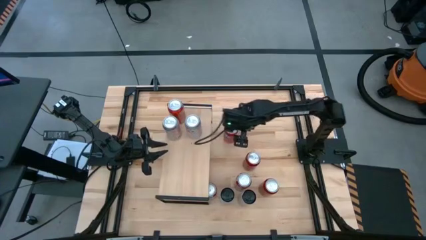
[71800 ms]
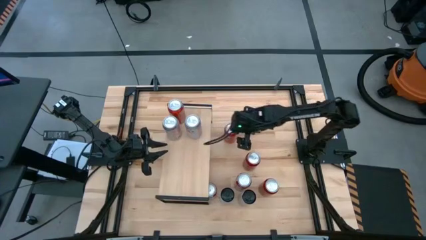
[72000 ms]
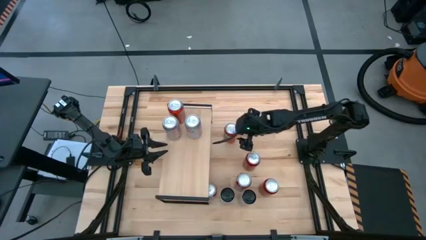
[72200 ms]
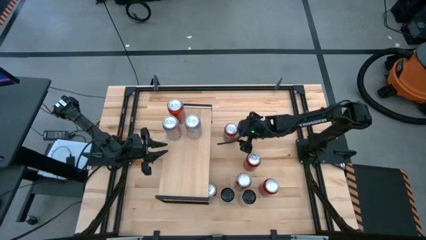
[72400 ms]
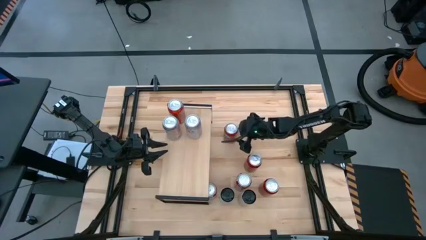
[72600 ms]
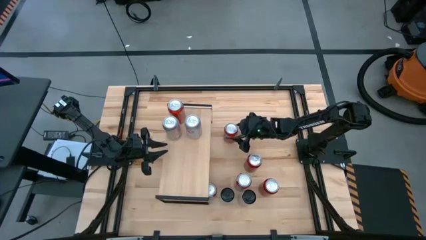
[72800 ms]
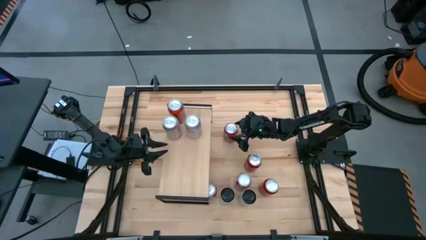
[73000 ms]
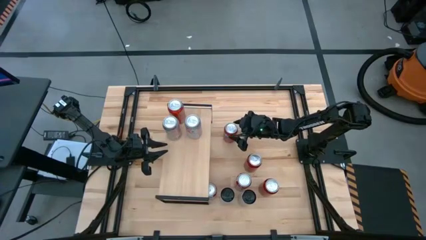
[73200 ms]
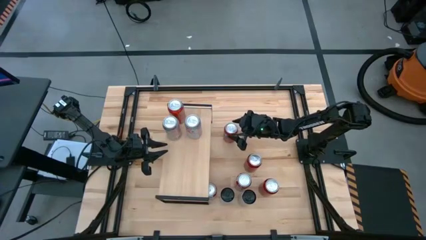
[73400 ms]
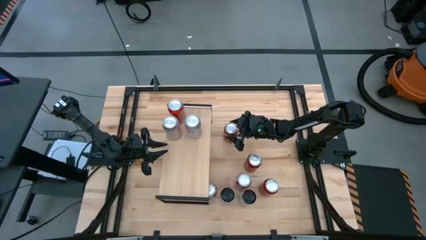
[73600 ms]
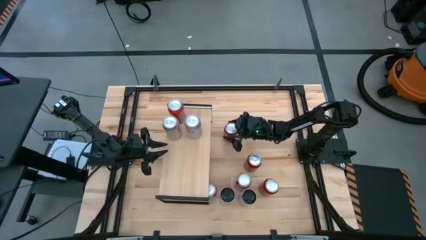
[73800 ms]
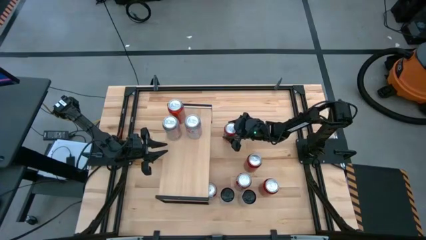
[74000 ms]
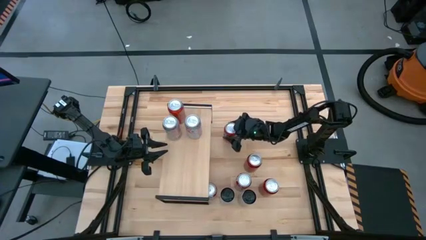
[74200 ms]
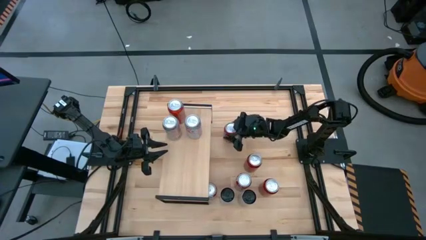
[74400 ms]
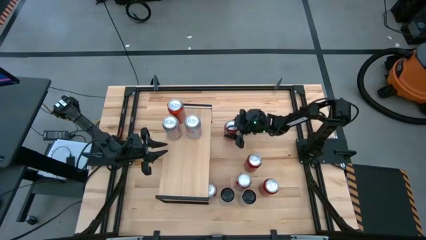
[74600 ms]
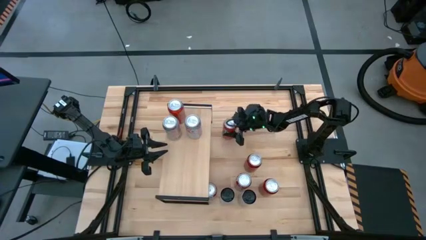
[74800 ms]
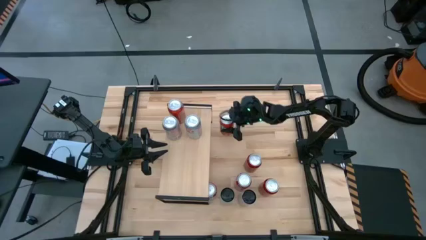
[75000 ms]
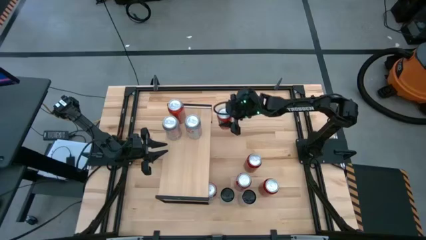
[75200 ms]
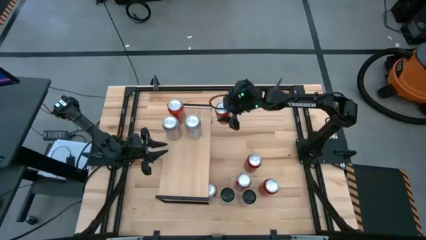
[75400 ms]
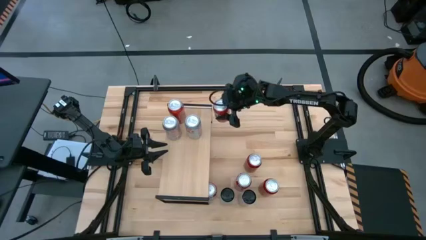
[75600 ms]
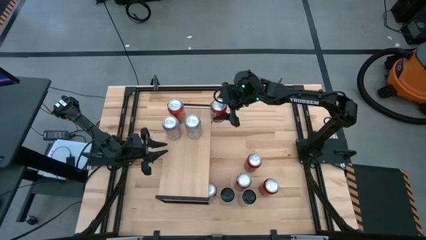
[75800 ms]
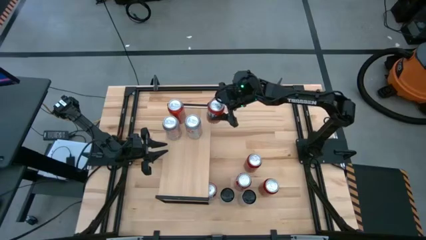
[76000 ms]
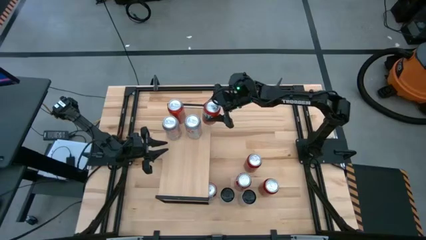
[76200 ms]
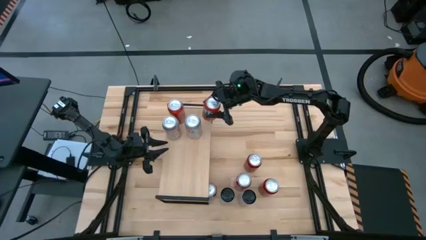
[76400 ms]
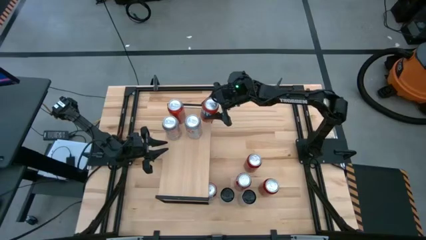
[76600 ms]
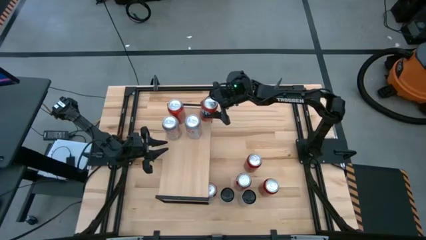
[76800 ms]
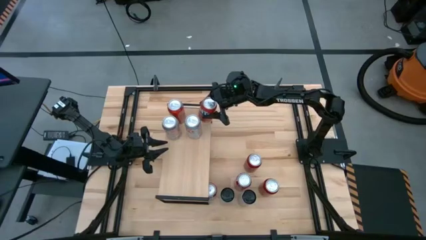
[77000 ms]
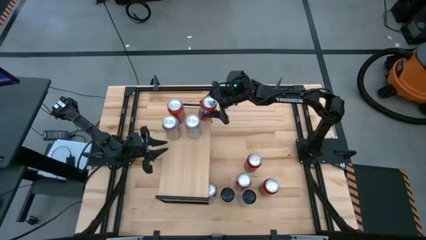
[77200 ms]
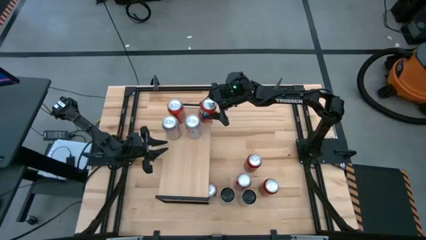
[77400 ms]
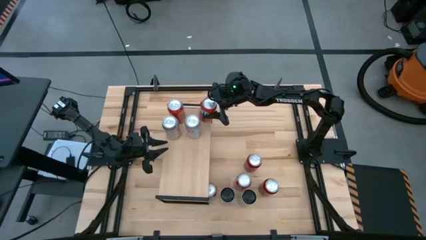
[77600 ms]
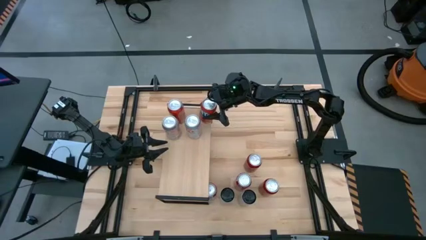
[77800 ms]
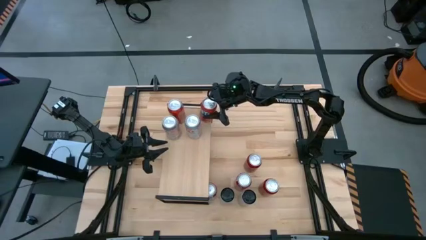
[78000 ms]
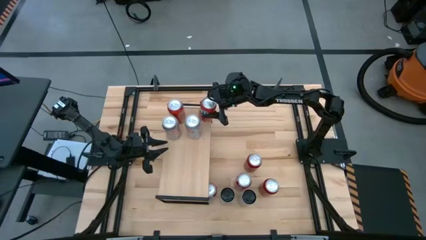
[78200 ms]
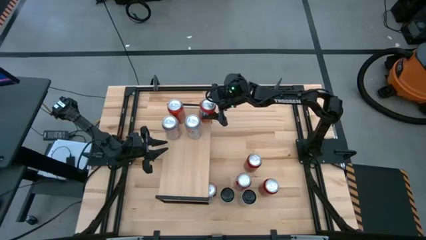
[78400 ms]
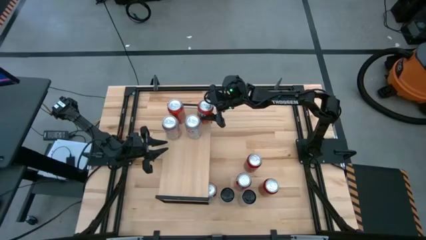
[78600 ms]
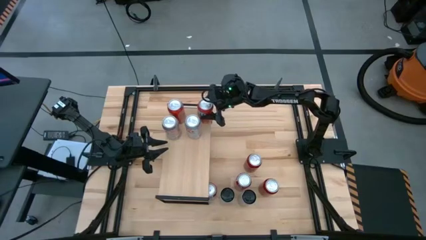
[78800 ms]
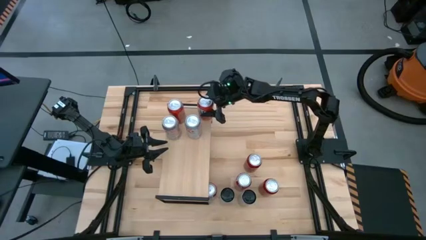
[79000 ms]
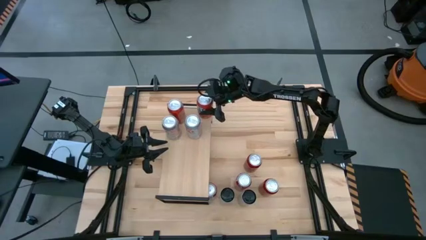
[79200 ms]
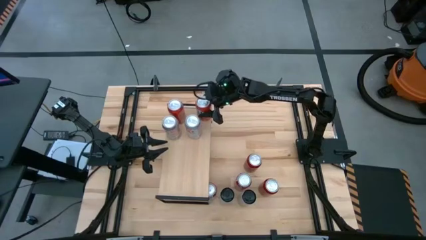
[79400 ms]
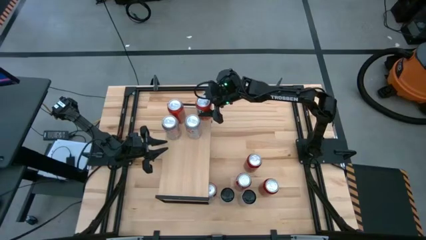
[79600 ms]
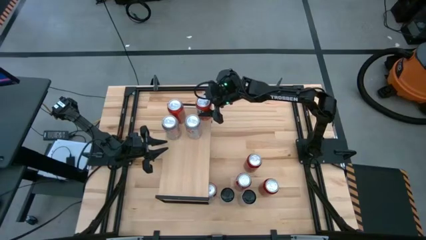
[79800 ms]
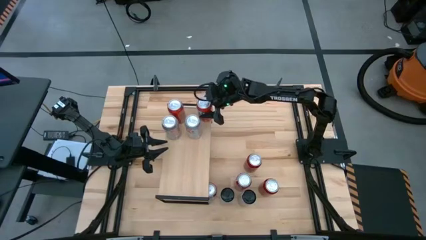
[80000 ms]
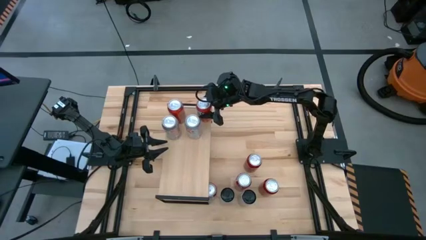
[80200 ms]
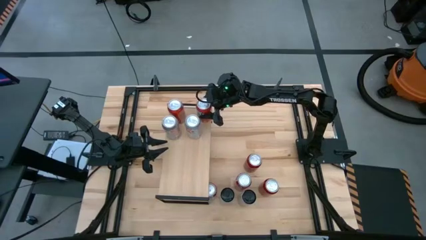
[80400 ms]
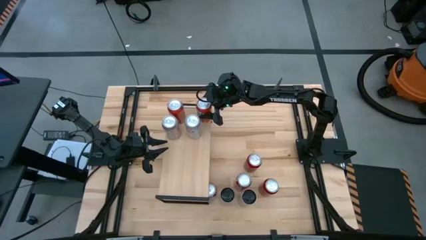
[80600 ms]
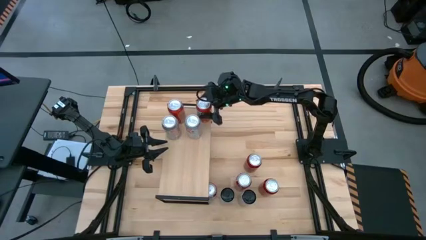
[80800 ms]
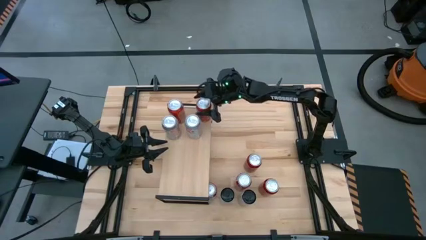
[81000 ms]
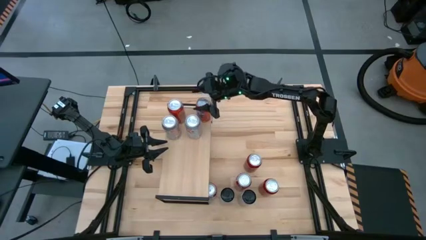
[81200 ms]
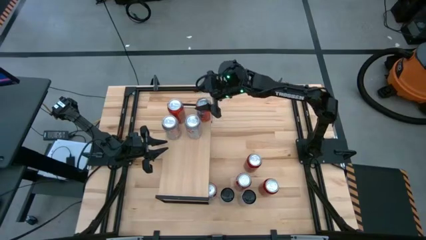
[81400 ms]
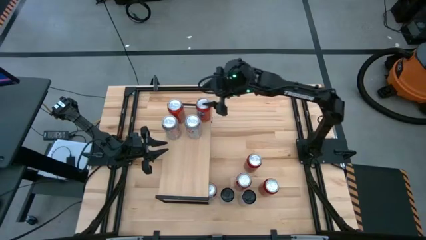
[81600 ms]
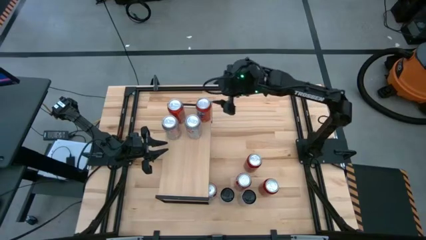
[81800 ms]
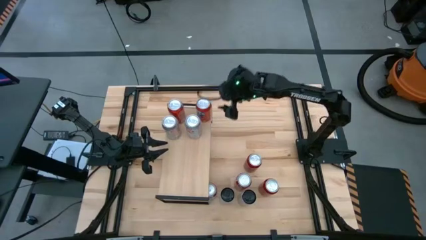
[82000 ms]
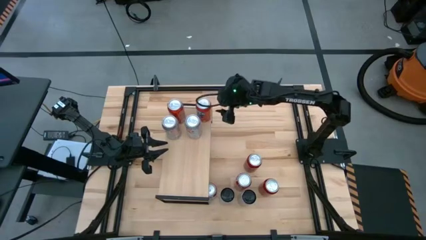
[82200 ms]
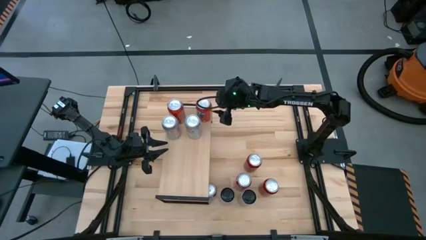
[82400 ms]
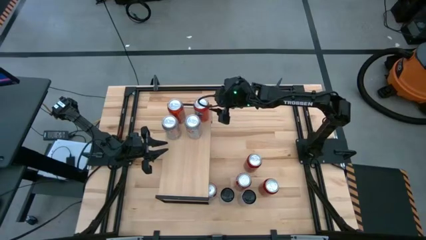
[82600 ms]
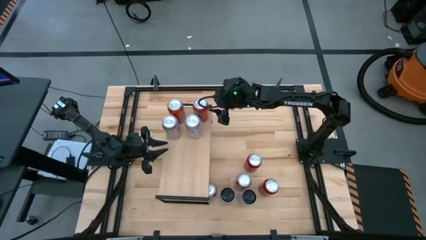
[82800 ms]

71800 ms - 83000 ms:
Task: Place canned beverage on shelf
Put the orange soda can on the shelf aligned with the other orange soda can
